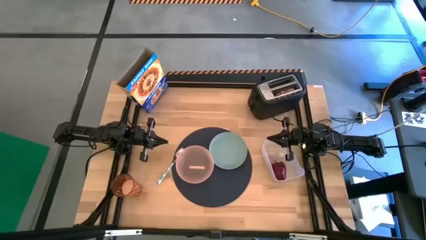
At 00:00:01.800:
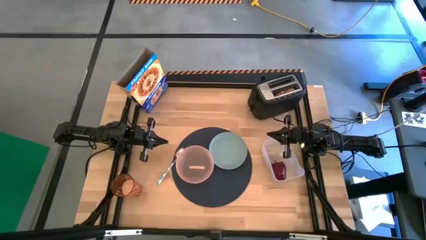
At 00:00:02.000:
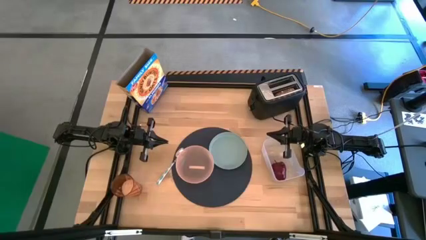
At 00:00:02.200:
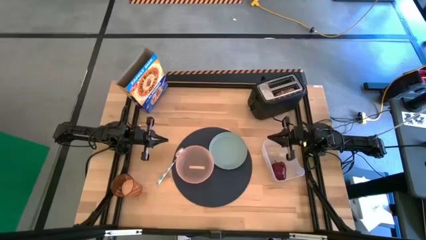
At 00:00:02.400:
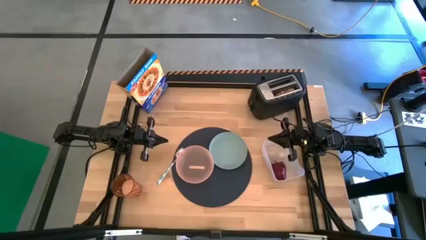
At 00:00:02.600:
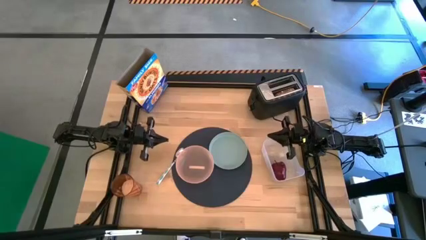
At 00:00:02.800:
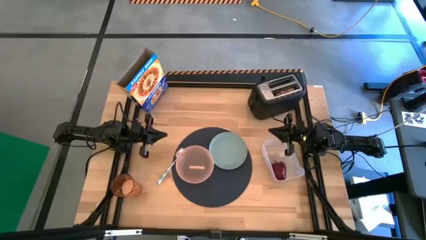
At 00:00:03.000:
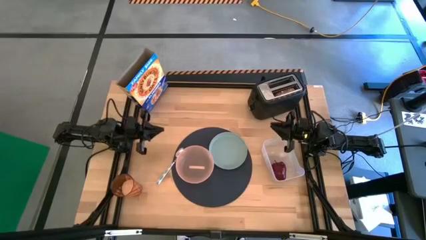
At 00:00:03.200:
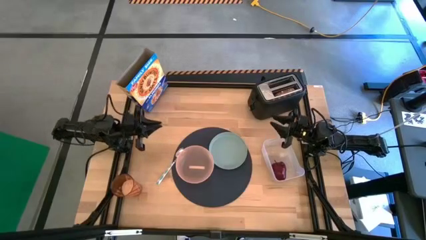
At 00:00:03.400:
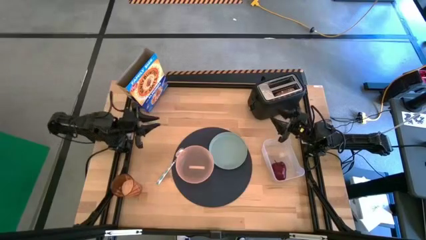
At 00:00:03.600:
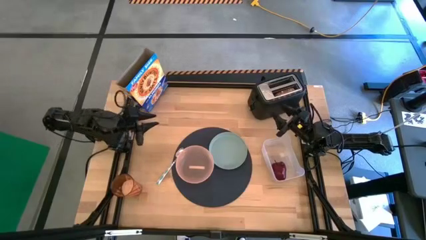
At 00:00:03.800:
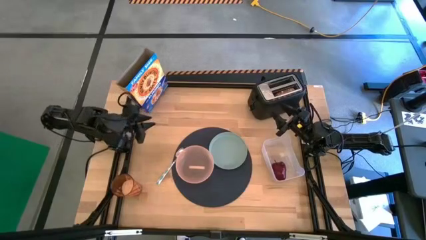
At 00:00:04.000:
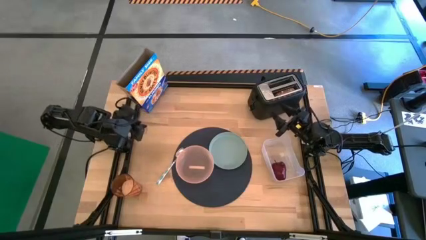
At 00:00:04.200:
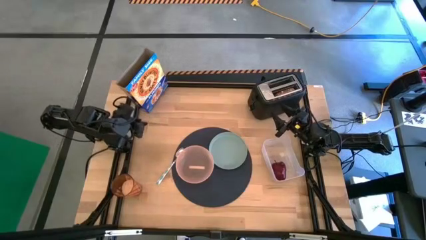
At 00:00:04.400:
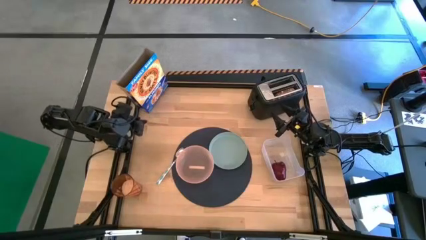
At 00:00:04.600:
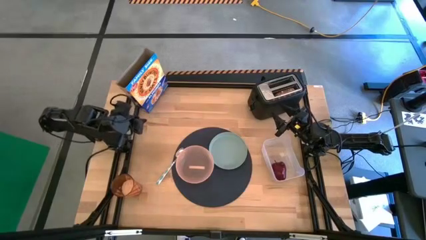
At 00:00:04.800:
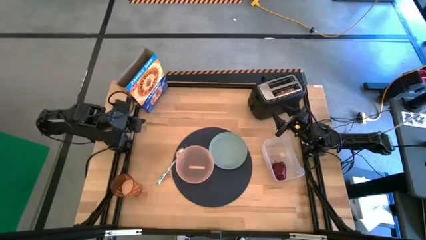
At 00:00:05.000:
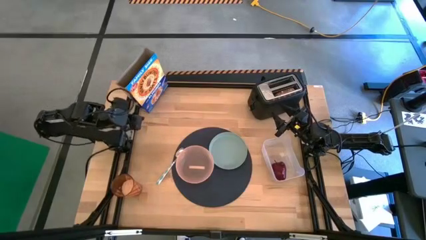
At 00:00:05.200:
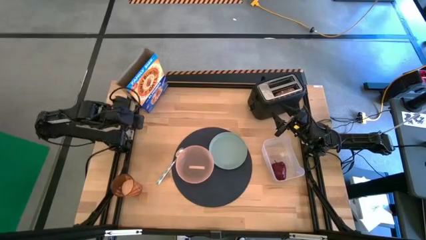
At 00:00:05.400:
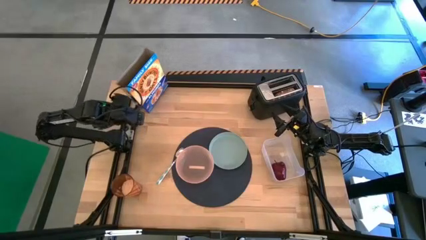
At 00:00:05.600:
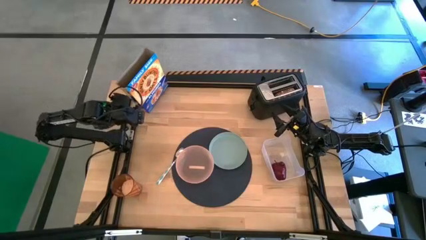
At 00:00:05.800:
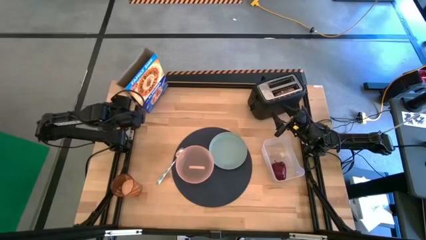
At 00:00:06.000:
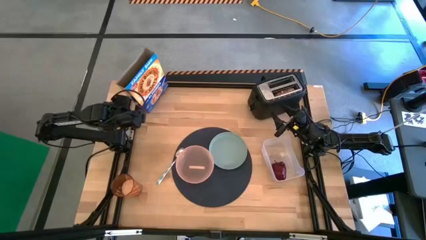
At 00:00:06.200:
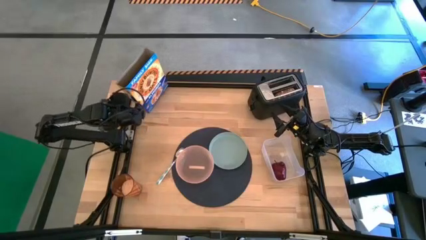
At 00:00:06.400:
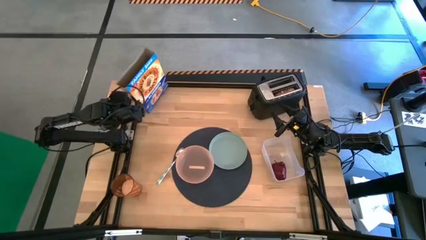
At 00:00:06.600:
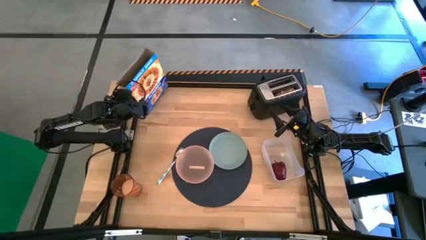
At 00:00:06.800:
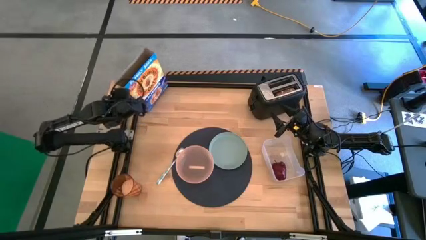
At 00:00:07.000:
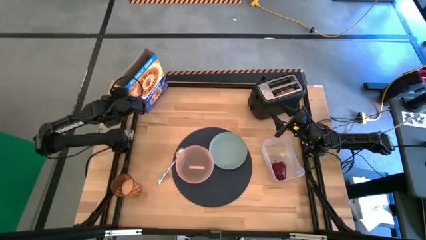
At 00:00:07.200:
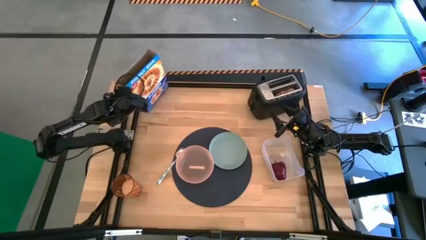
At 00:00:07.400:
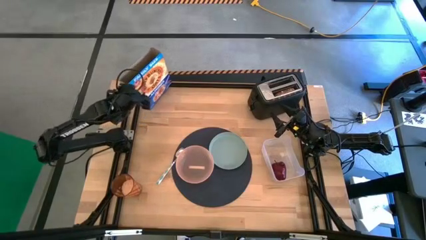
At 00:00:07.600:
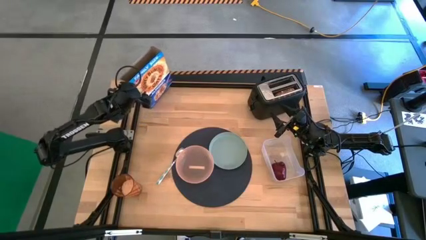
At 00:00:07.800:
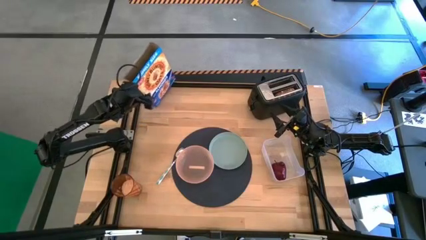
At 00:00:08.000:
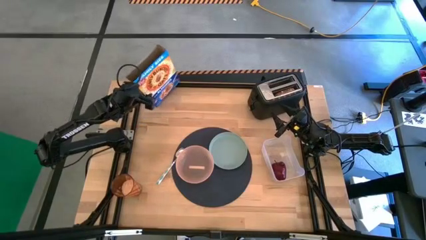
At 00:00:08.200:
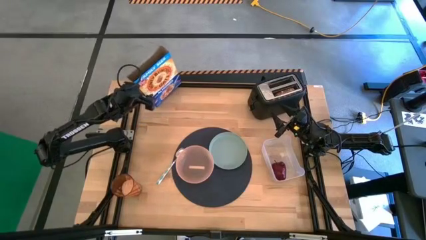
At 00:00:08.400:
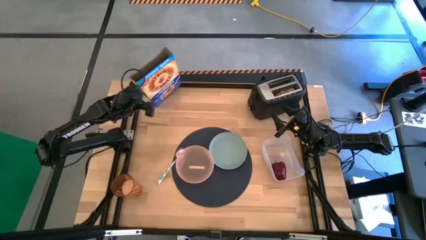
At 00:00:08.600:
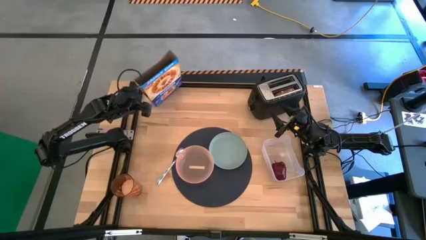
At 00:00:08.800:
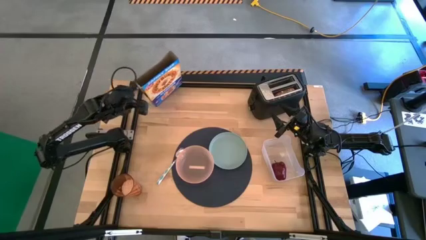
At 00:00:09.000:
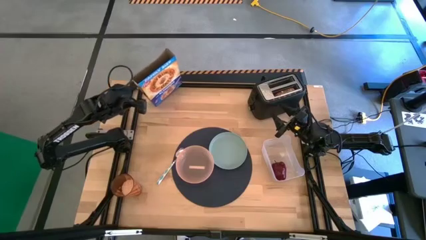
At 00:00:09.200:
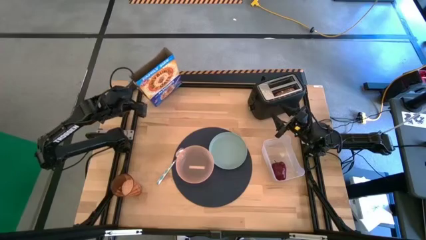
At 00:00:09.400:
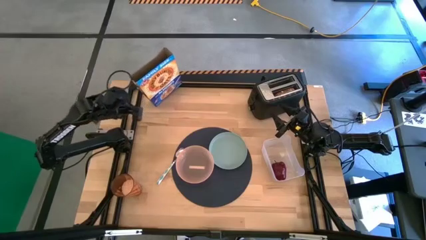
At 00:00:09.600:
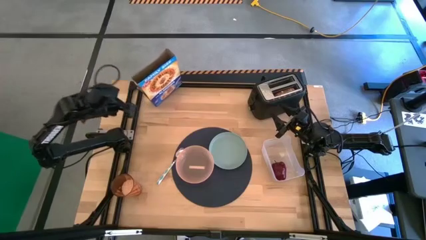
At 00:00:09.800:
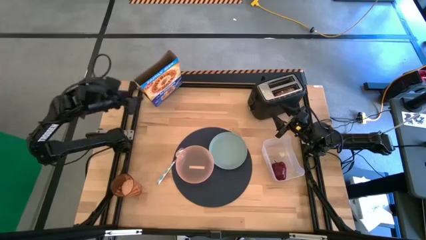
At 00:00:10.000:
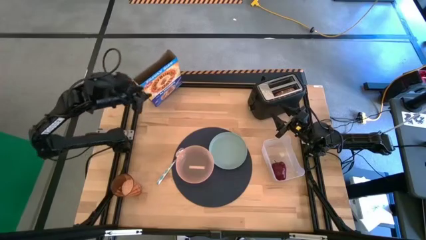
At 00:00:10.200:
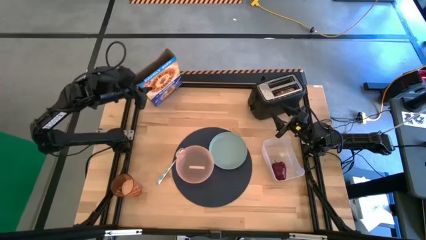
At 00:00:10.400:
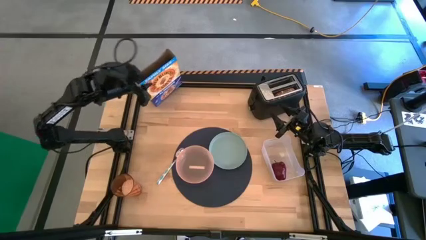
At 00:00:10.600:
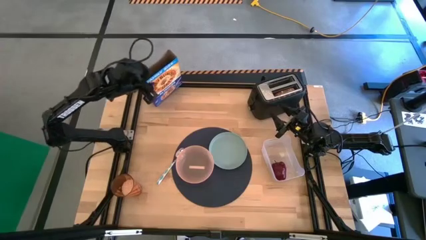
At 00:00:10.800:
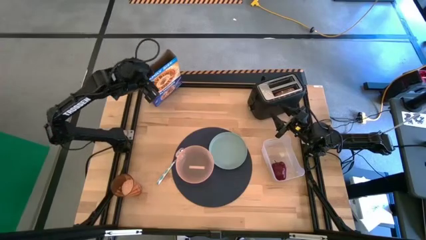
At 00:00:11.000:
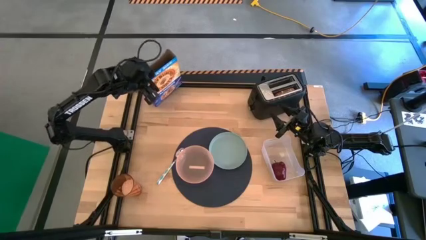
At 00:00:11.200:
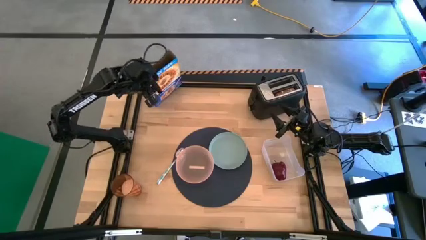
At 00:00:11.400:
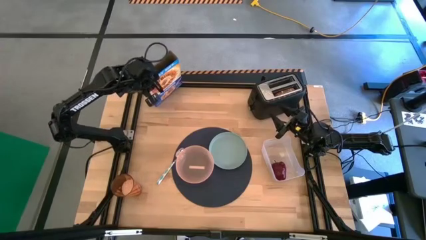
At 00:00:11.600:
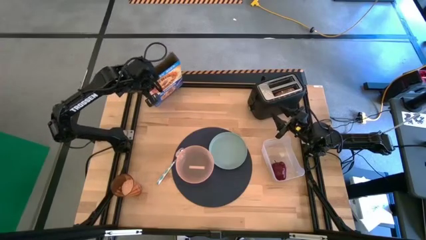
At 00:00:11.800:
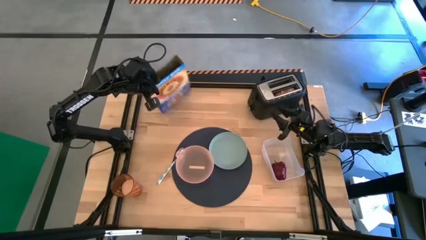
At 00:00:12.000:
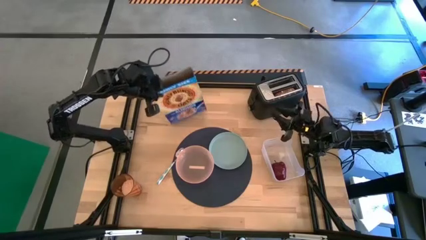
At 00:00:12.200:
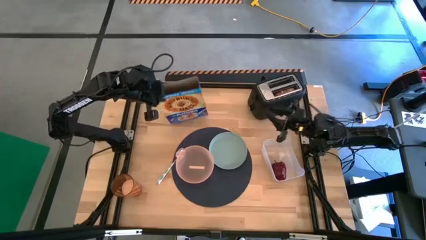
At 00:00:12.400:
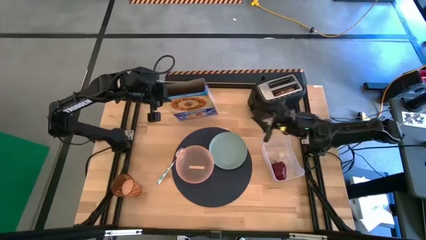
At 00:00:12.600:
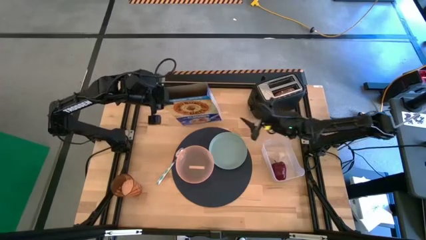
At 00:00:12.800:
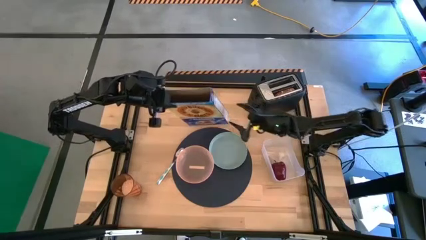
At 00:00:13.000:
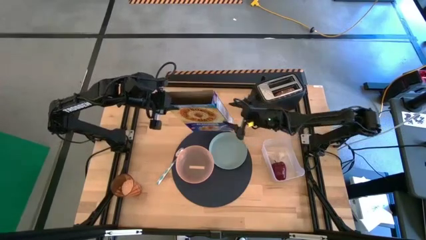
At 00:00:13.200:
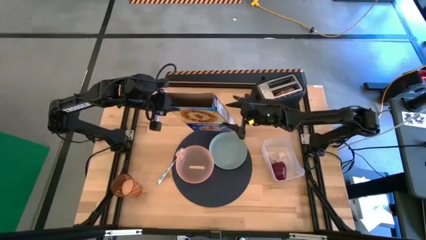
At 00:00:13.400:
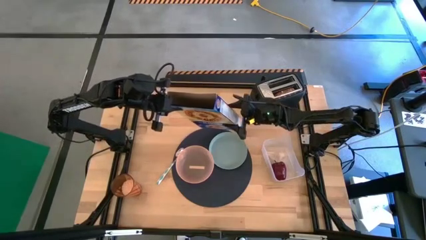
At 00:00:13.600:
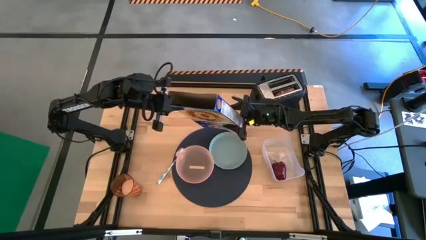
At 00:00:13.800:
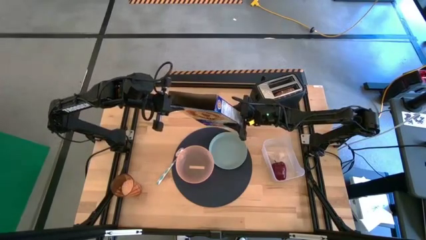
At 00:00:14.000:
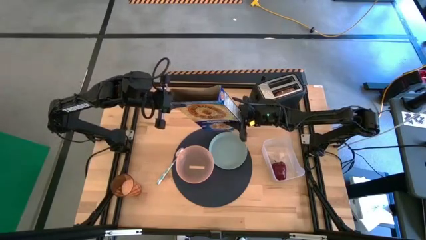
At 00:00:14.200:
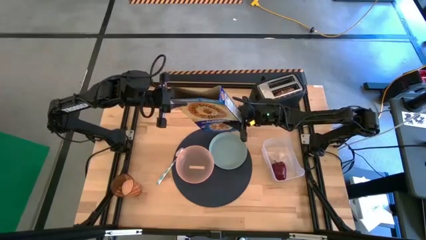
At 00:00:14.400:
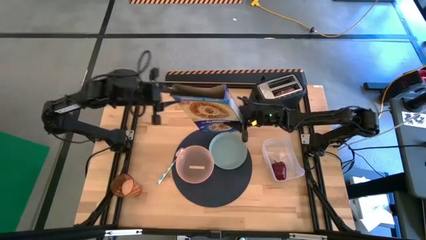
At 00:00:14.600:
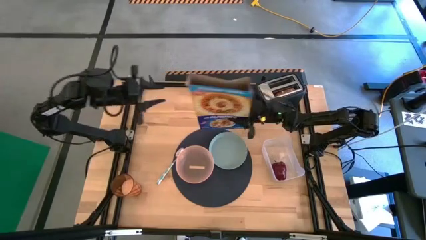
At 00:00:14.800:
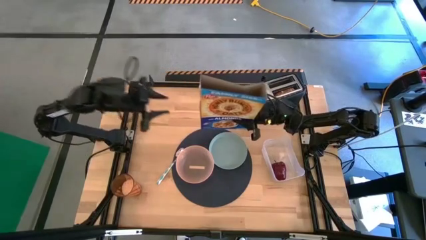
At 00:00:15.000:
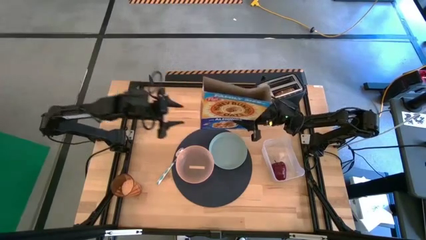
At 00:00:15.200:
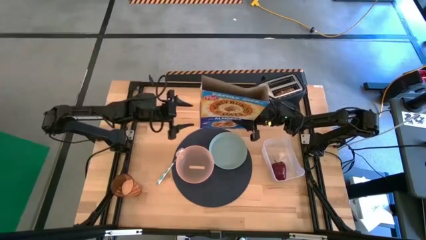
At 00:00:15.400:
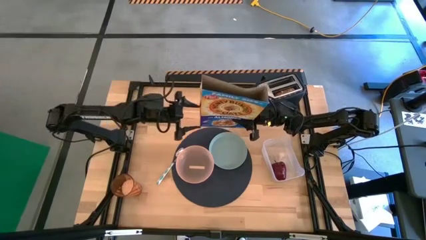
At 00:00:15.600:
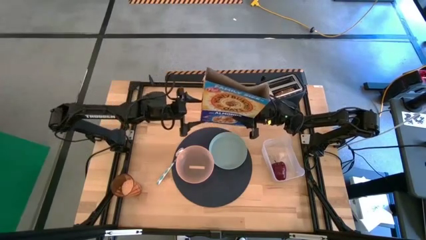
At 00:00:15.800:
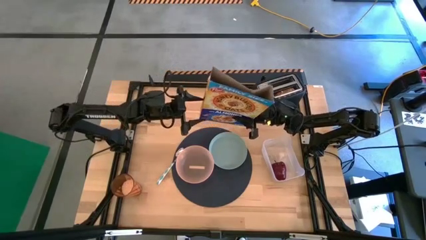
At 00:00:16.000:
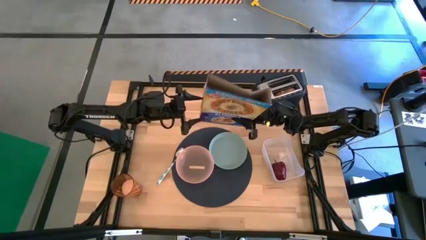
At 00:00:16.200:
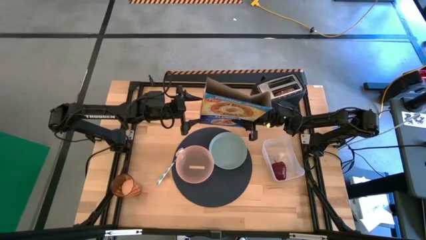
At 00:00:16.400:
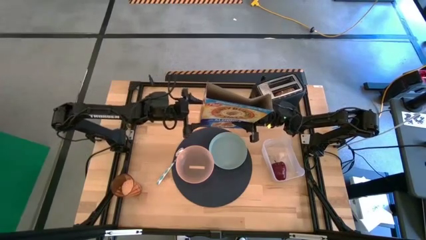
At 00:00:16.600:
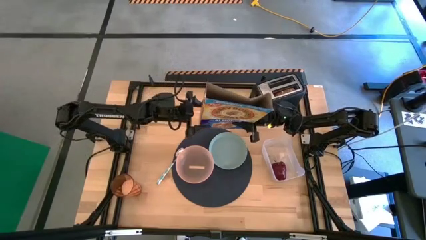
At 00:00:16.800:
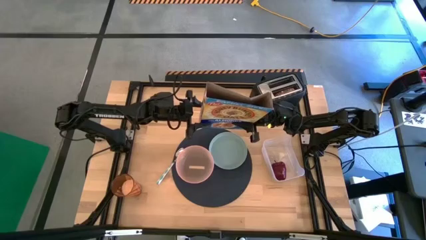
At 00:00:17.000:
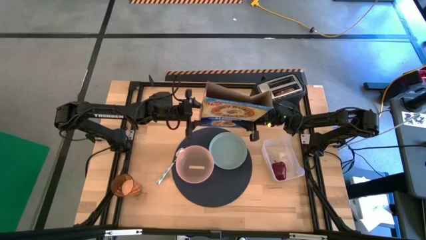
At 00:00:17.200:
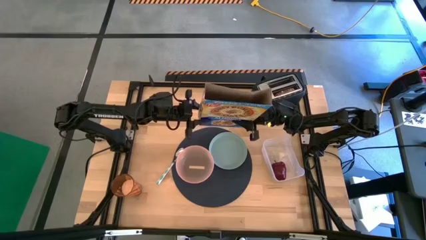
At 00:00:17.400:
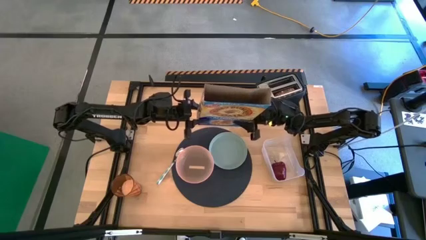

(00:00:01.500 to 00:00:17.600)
Task: Arrange a breakfast setting
Pour the cereal from the cereal box into the pink bowl
